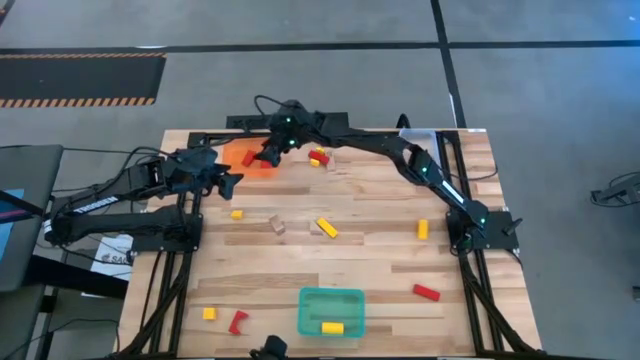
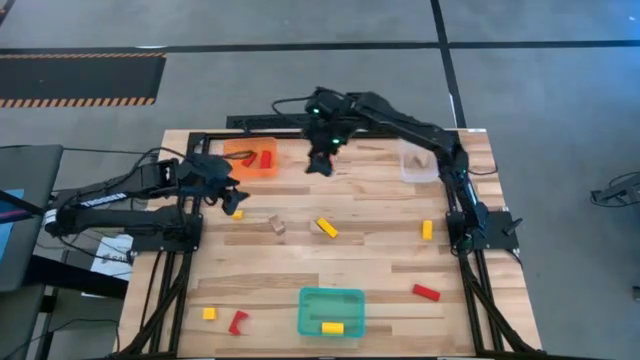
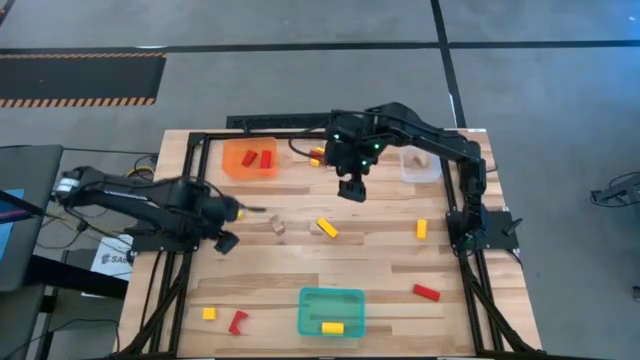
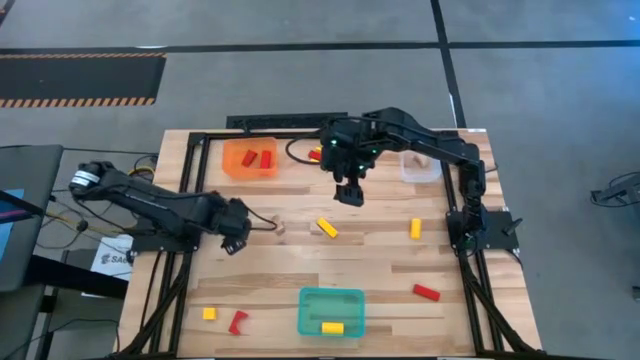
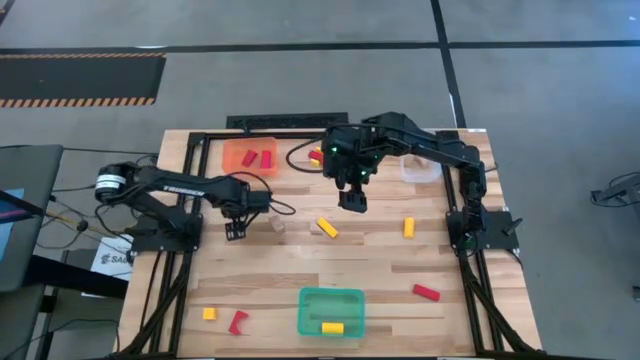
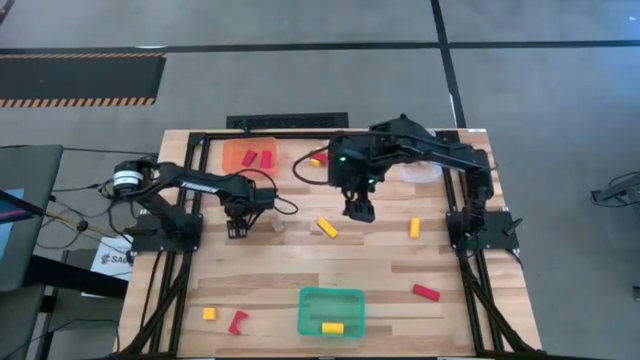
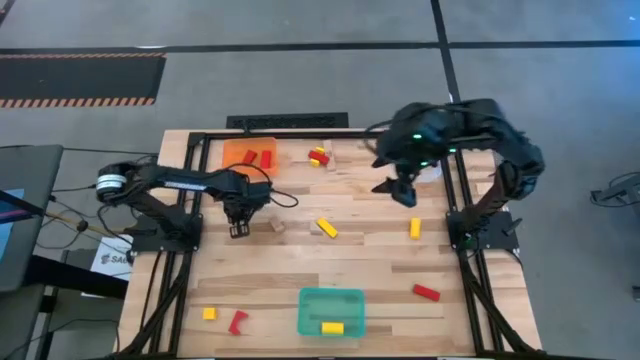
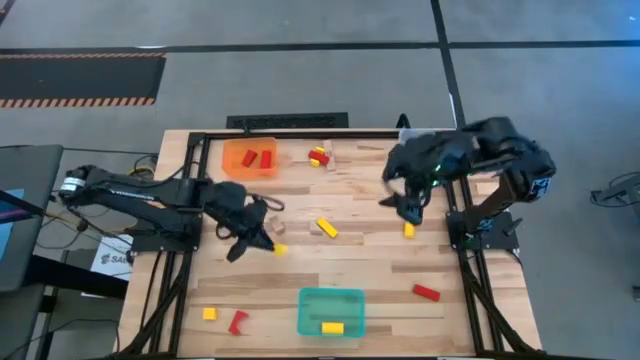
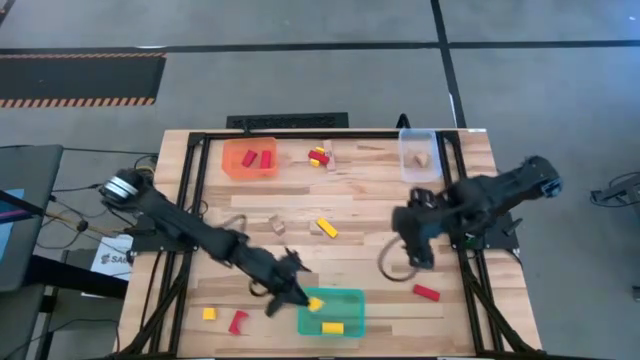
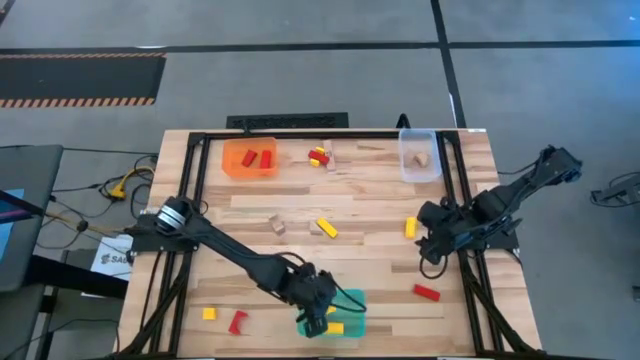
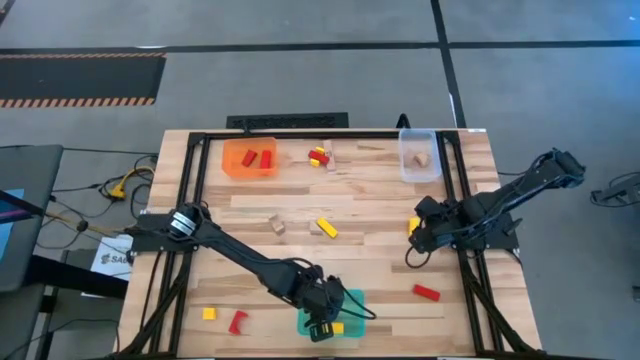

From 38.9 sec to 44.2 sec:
Task: Sort & place blocks by color
Put the yellow block into the blue bin

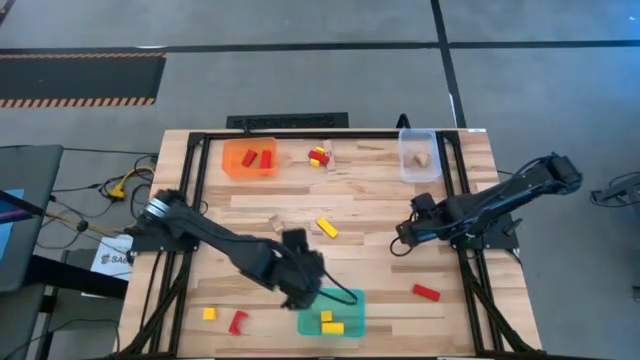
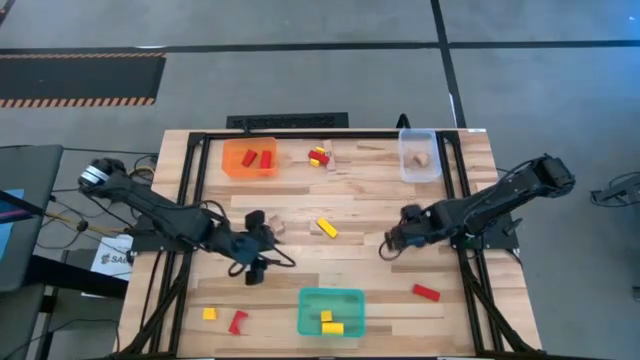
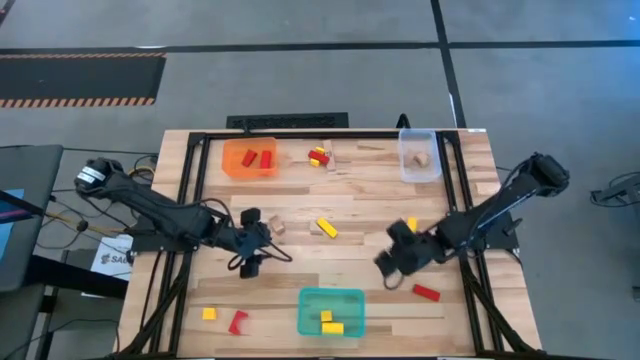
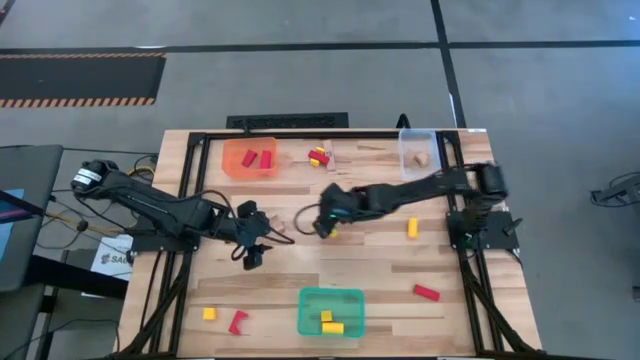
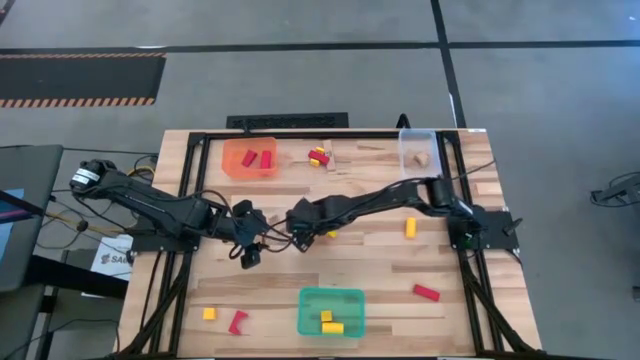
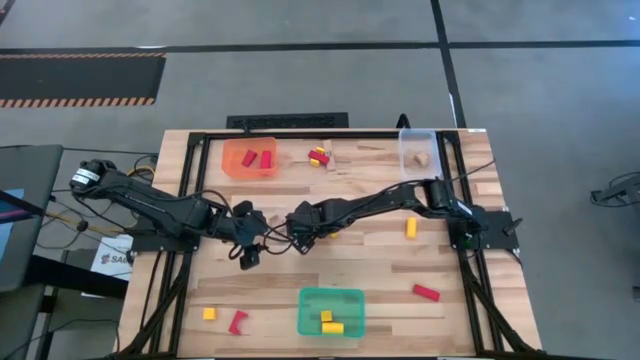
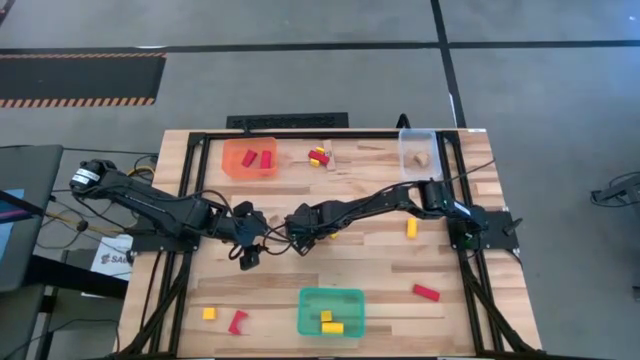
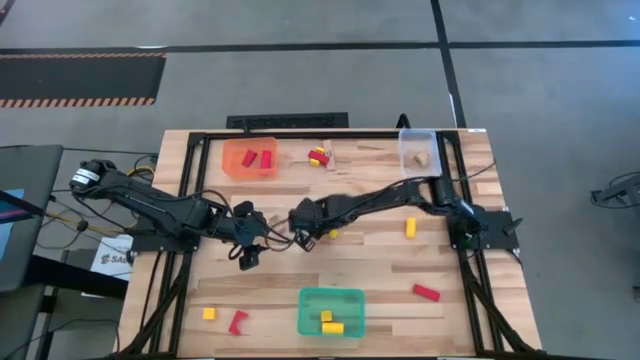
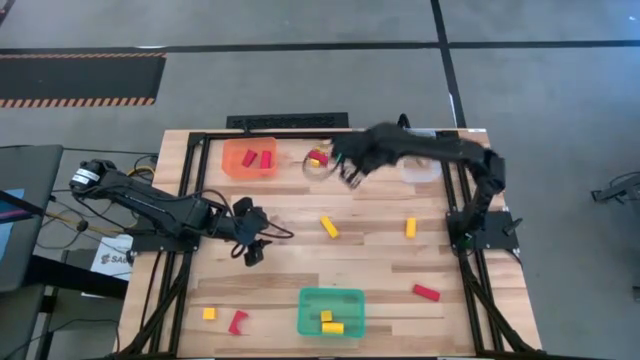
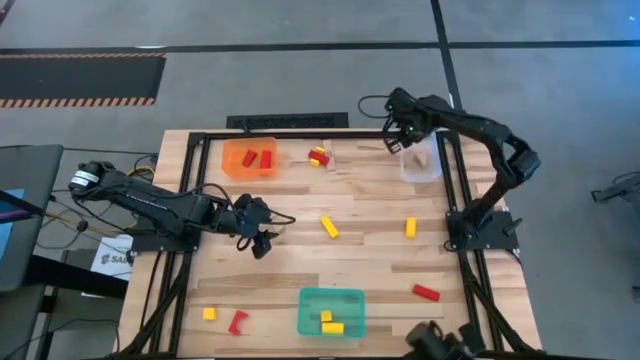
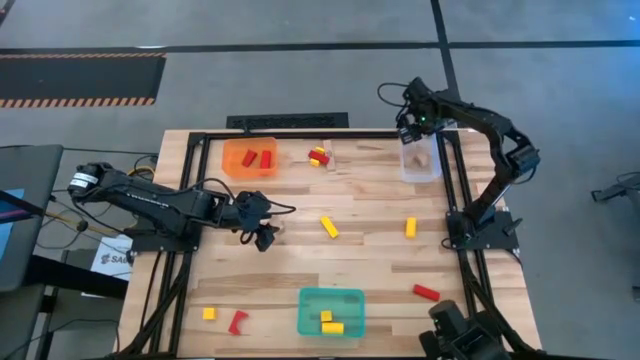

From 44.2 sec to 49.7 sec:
Put the brown block into the transparent bin

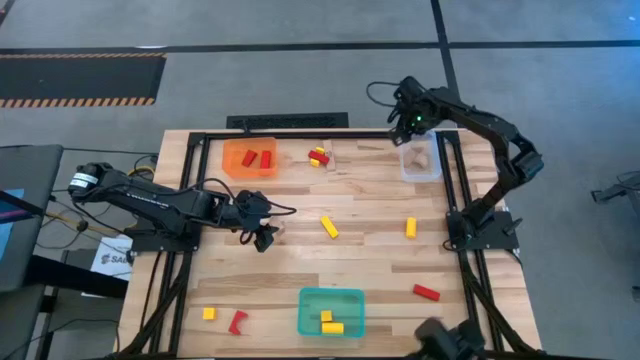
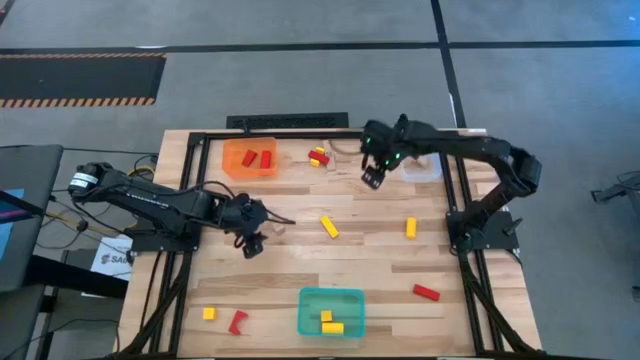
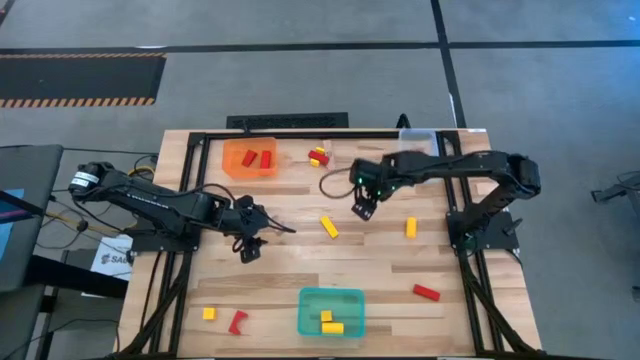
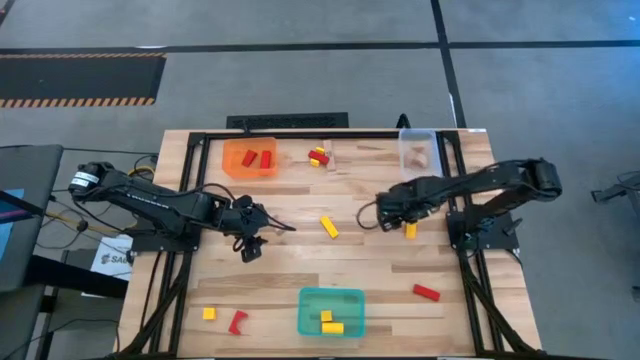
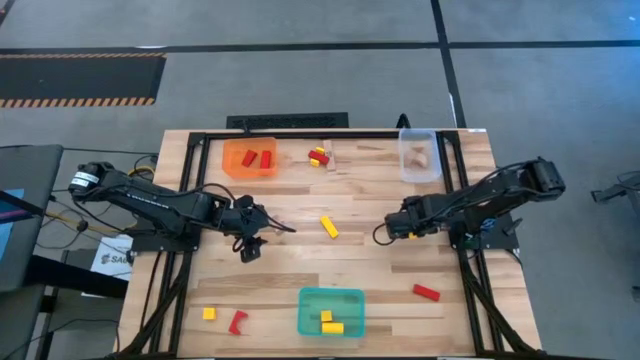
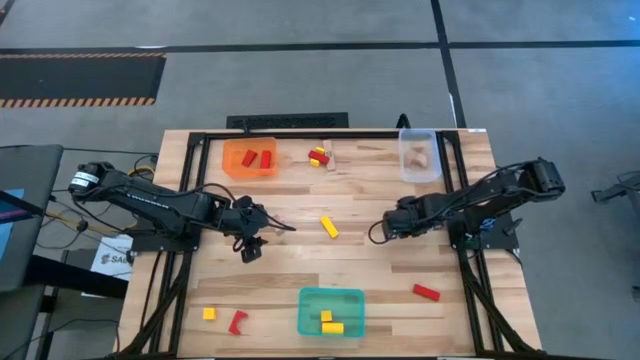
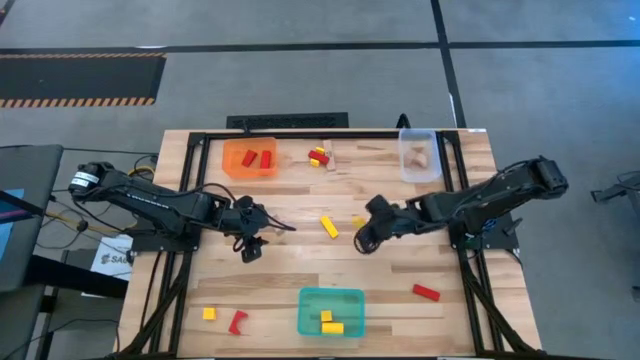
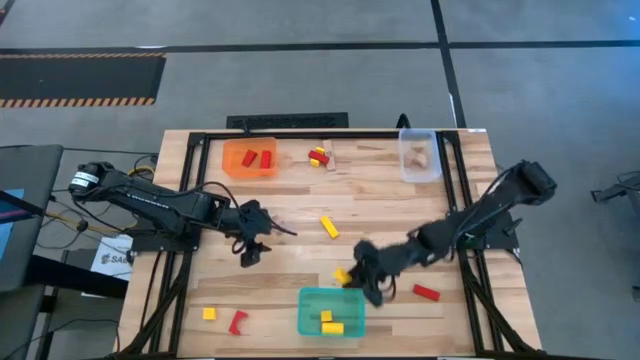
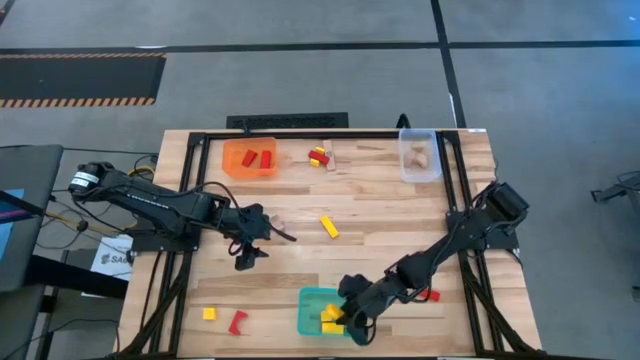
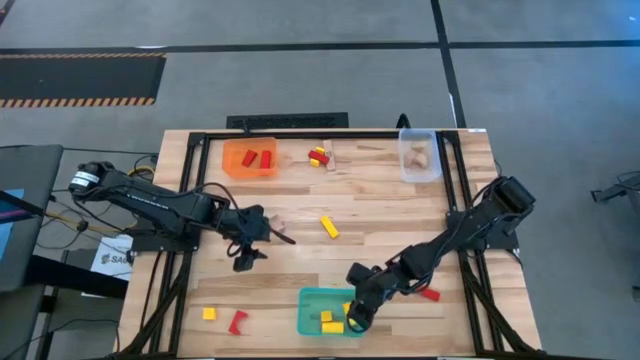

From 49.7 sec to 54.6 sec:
Put the yellow block into the blue bin

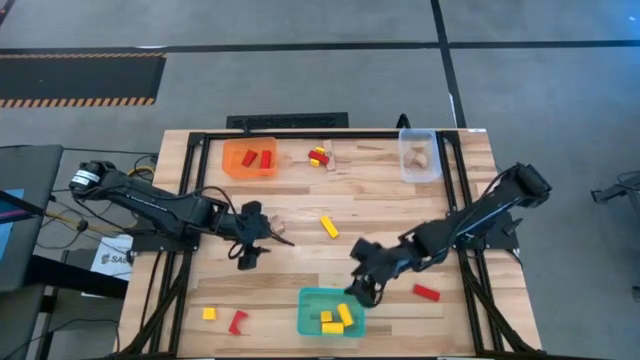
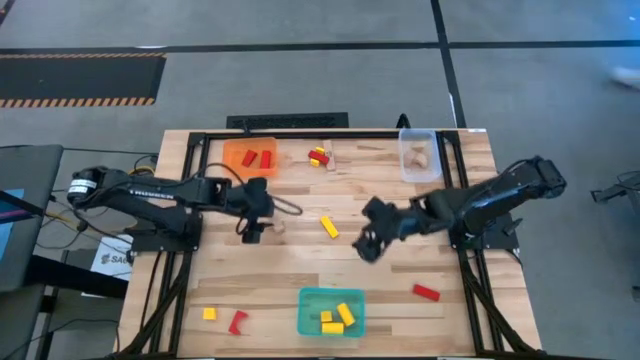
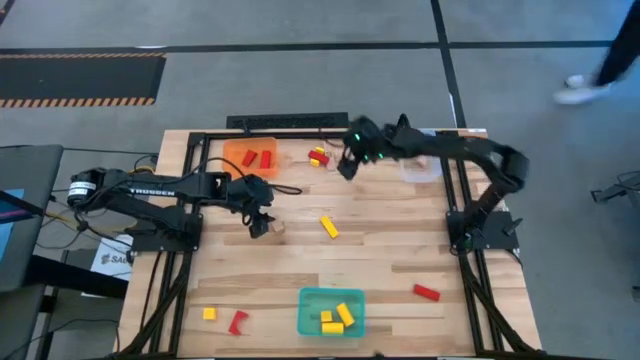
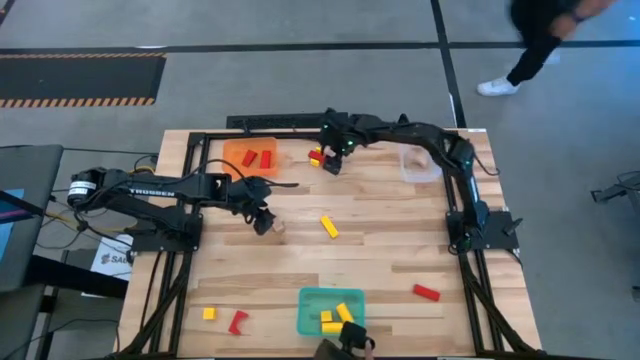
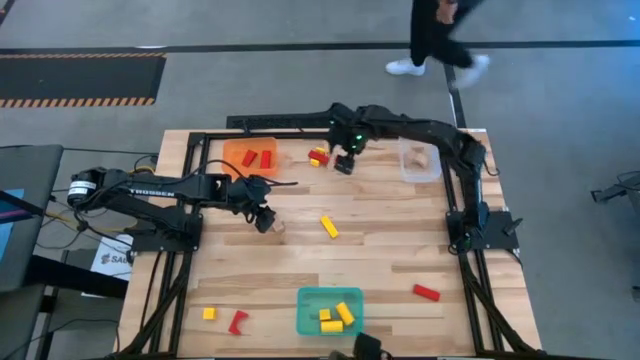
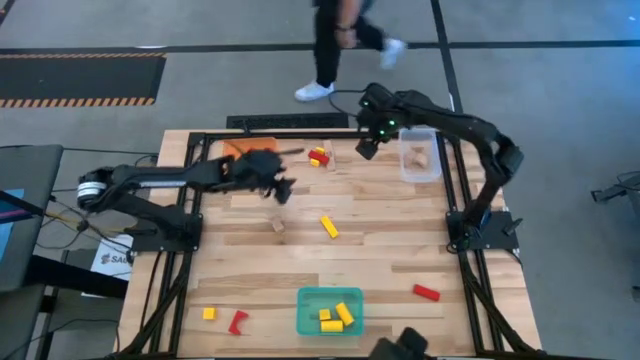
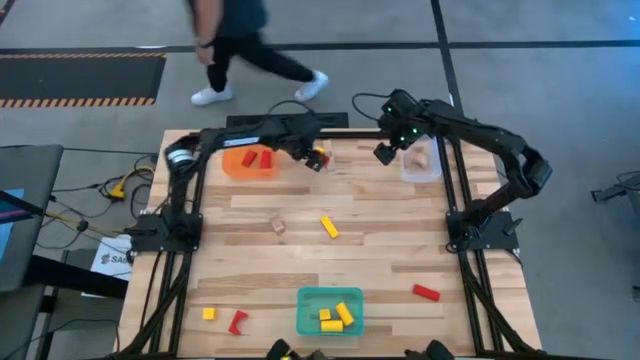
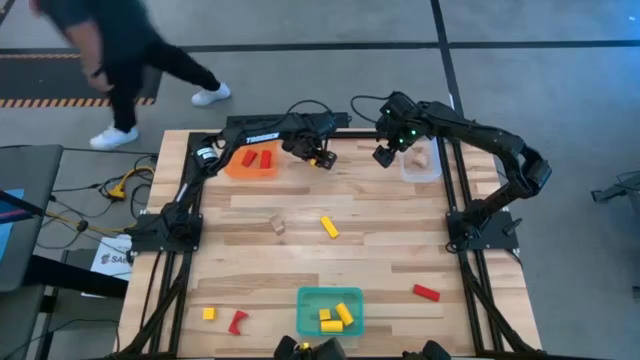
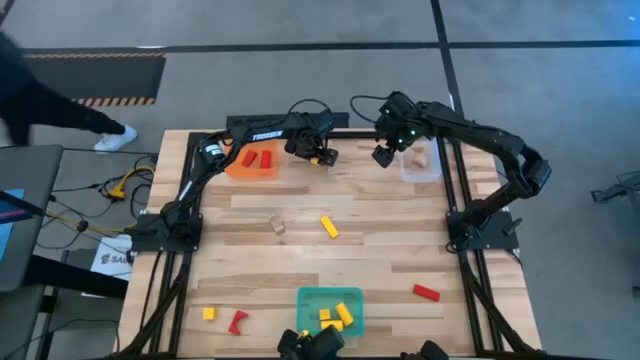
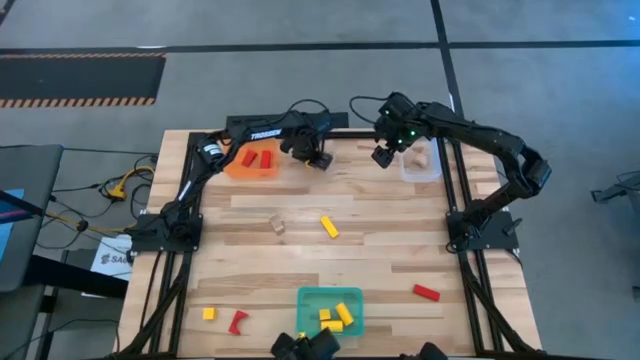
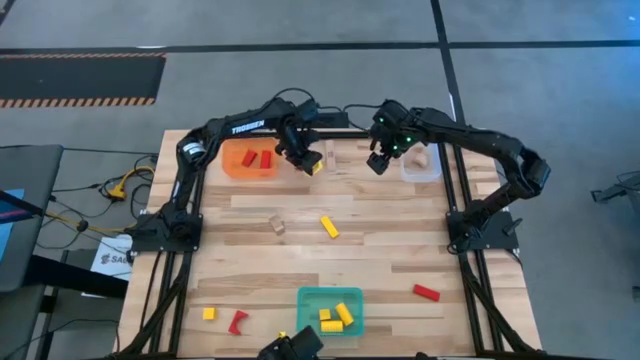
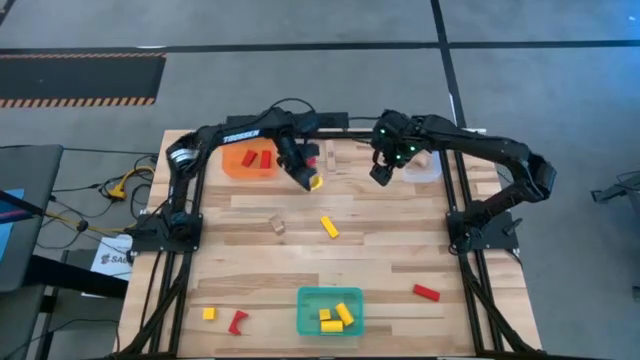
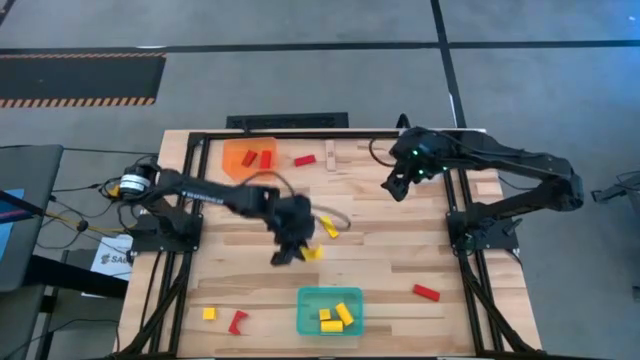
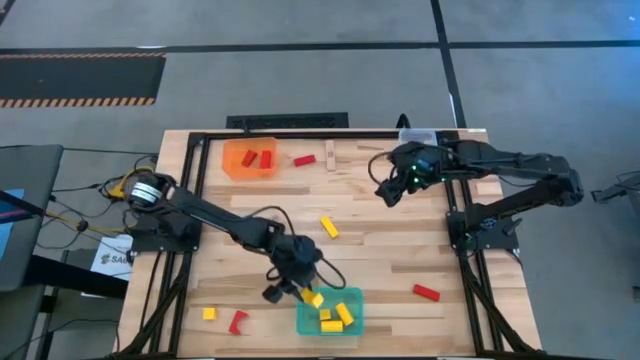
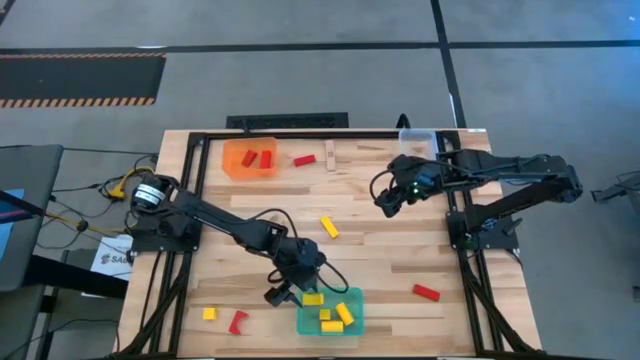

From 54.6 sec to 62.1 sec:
Put the yellow block into the blue bin
